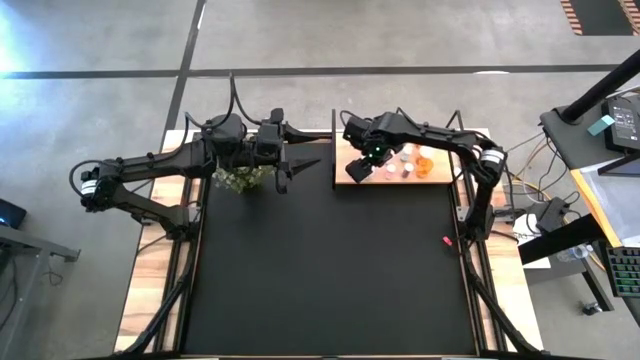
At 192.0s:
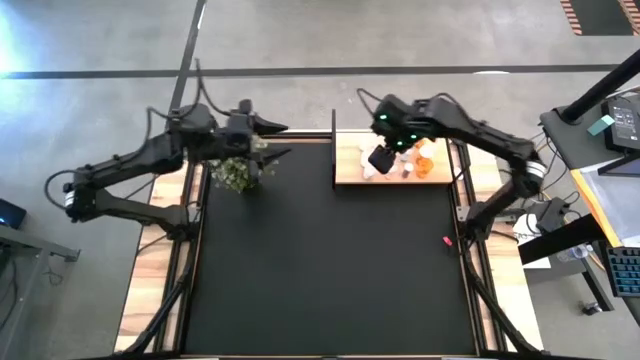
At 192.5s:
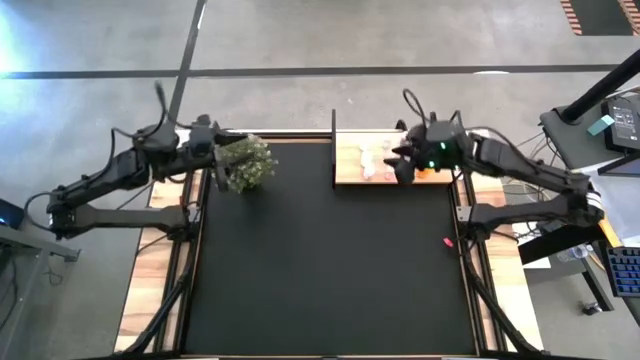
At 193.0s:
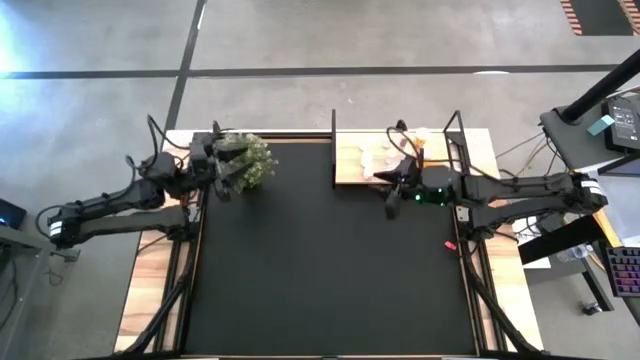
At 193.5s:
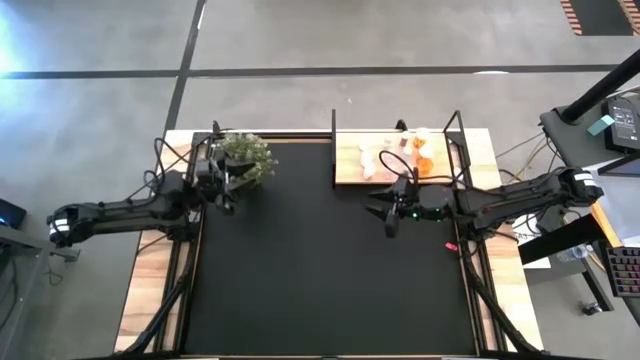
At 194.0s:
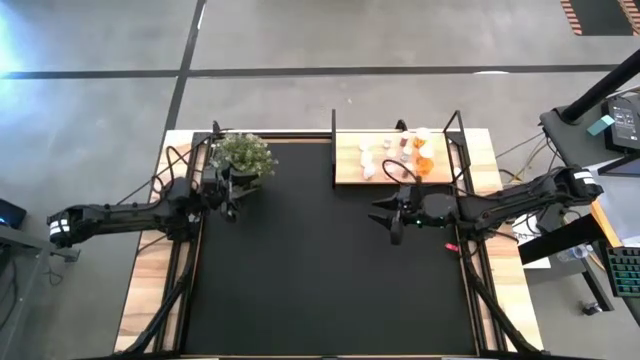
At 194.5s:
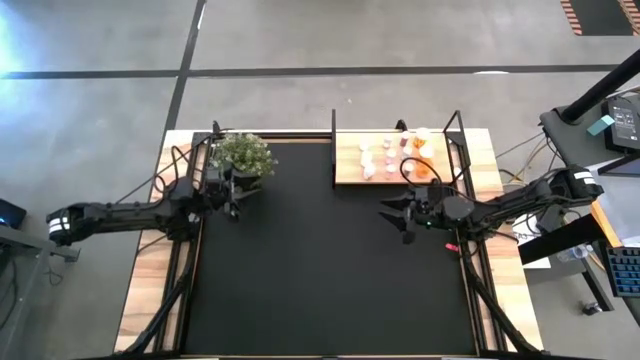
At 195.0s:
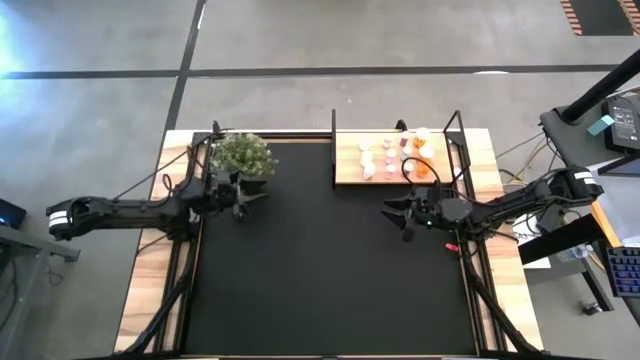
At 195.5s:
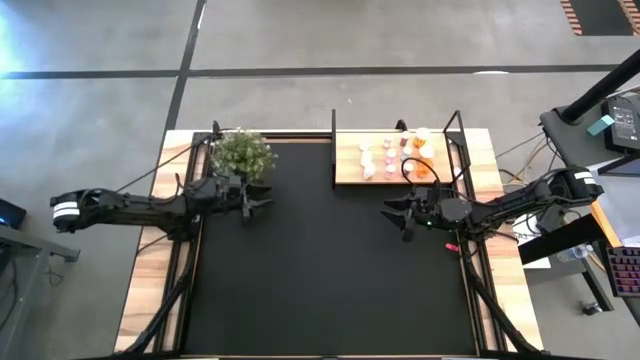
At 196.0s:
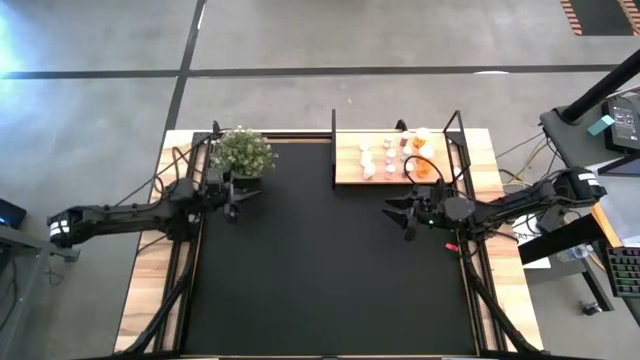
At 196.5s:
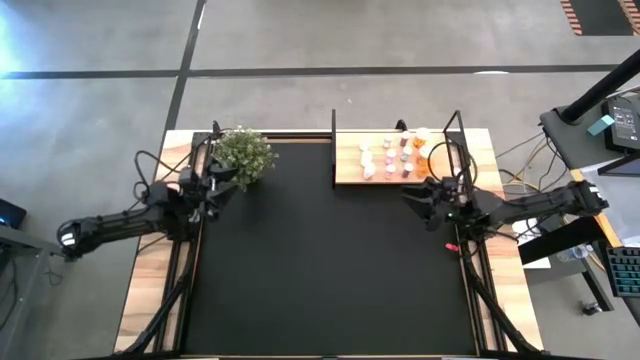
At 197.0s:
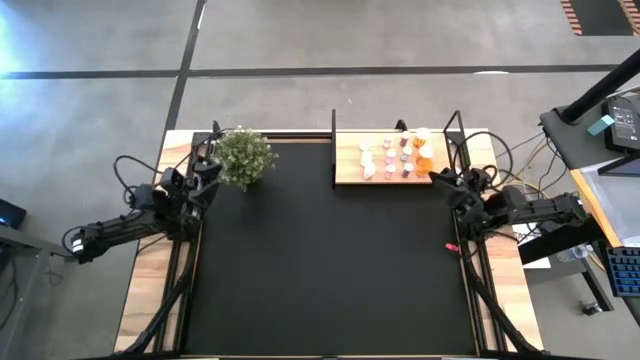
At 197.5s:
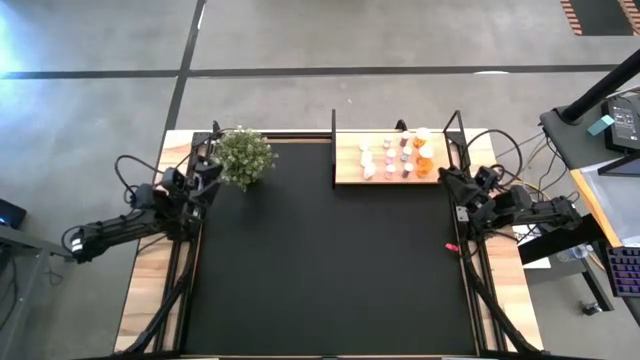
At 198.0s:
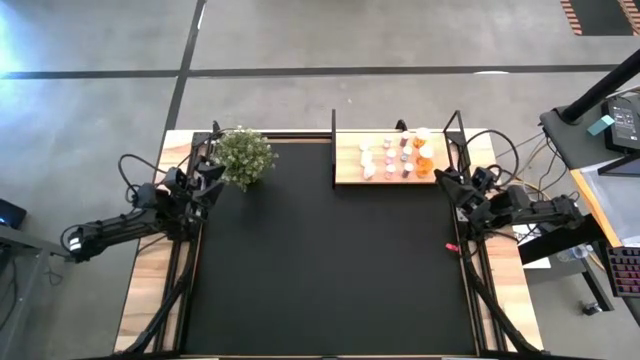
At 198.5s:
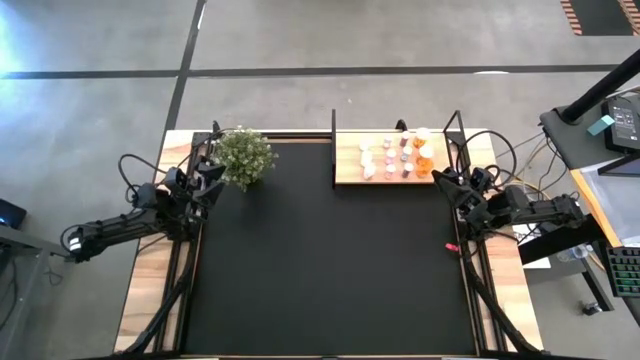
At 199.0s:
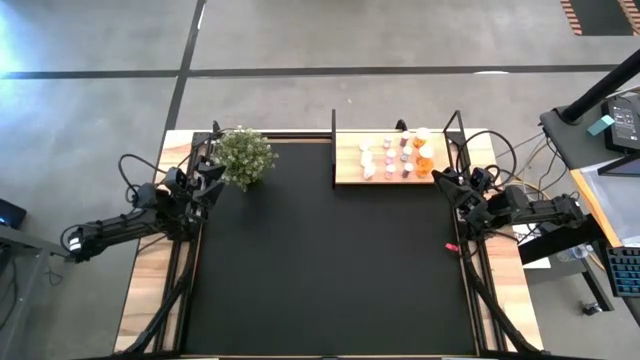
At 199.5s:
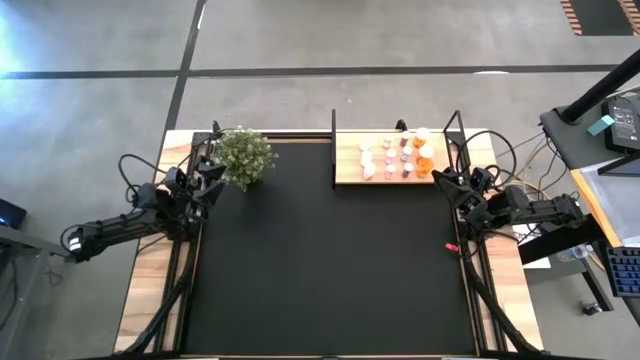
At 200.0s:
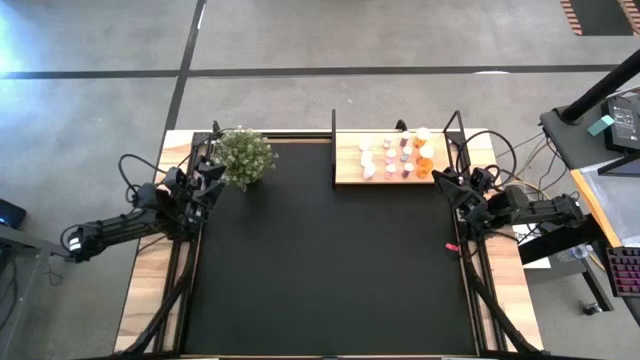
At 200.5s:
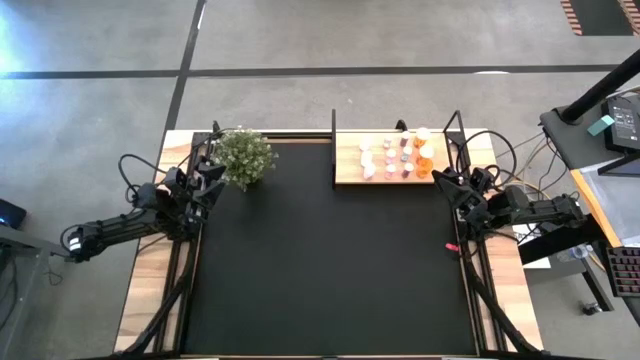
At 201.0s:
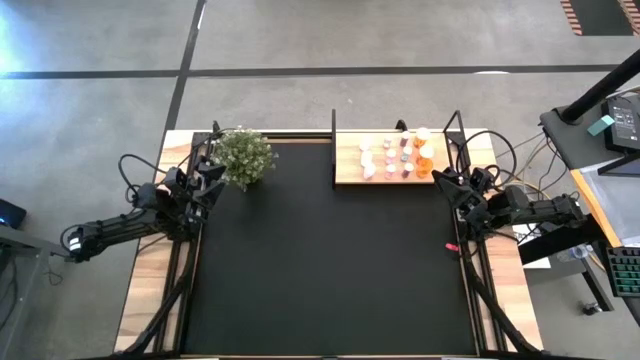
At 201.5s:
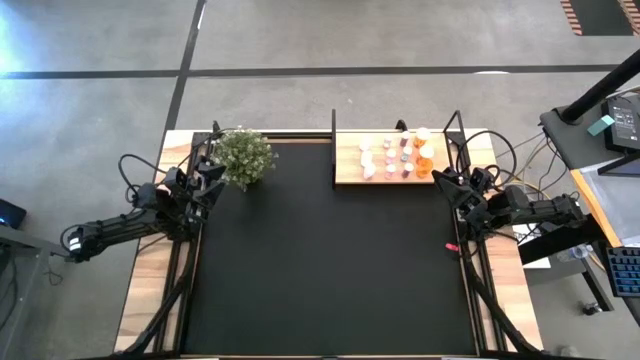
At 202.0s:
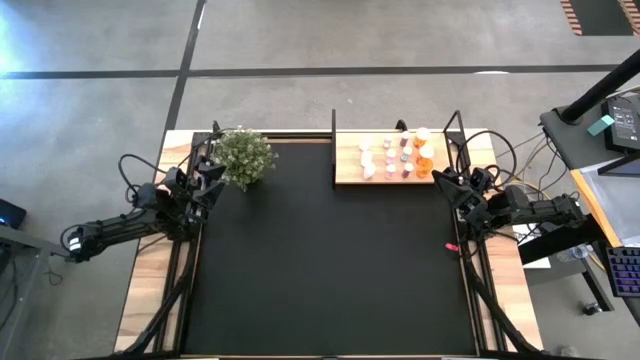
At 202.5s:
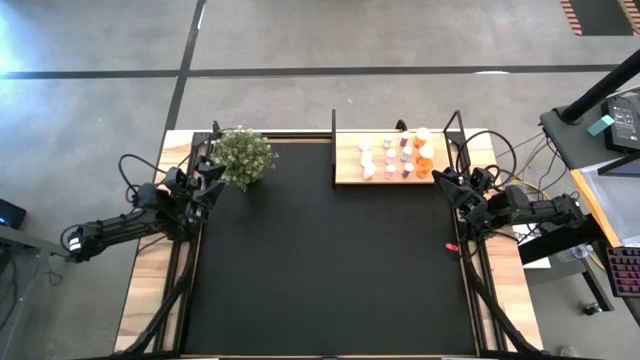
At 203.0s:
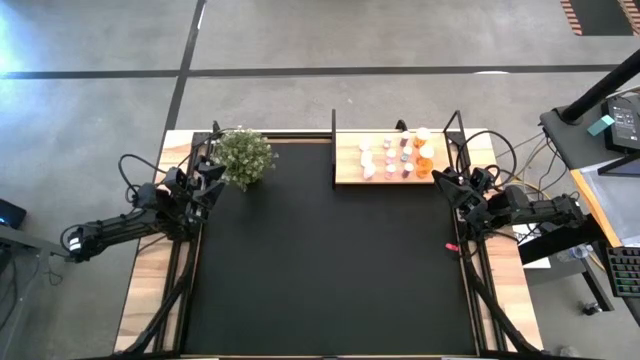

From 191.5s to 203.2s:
Task: Pick and place medicine bottles onto shelf by color
Return to Home Position

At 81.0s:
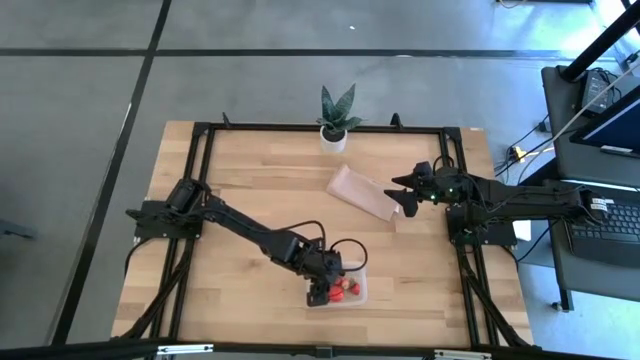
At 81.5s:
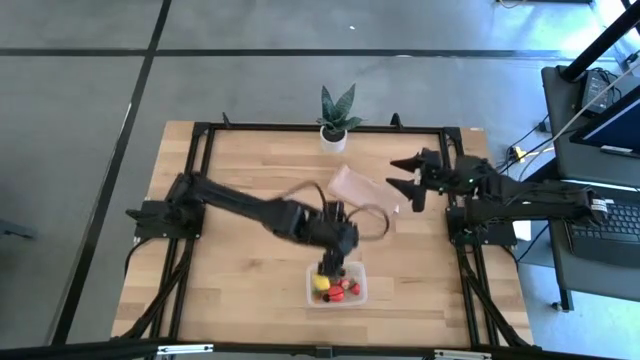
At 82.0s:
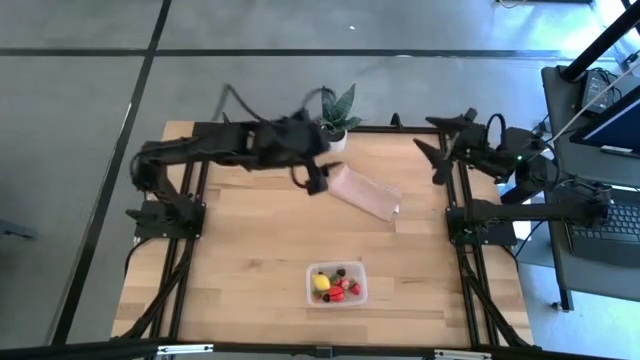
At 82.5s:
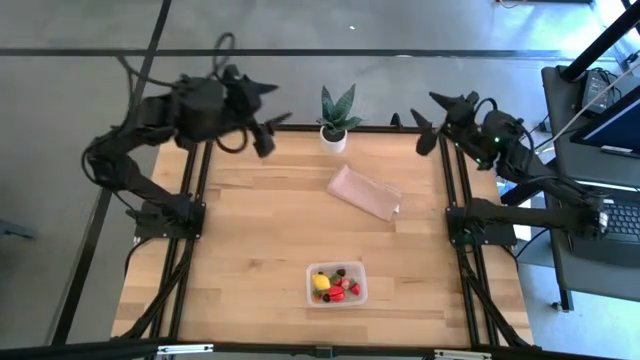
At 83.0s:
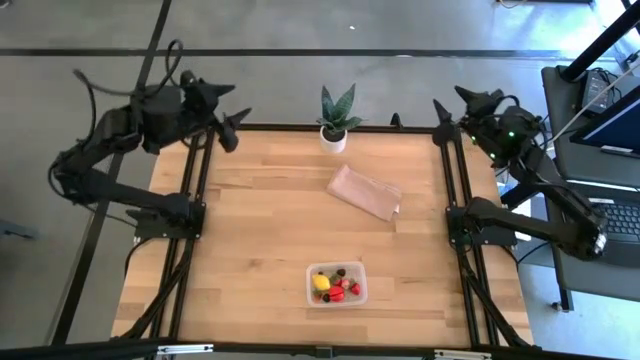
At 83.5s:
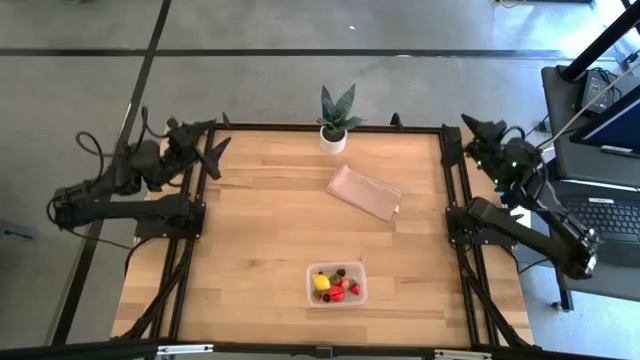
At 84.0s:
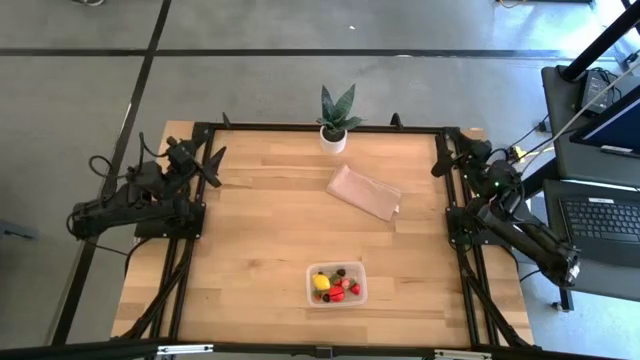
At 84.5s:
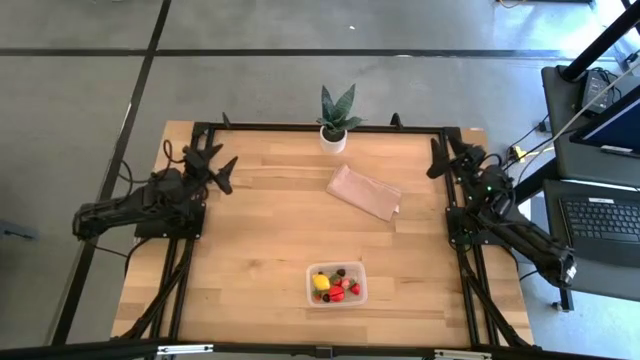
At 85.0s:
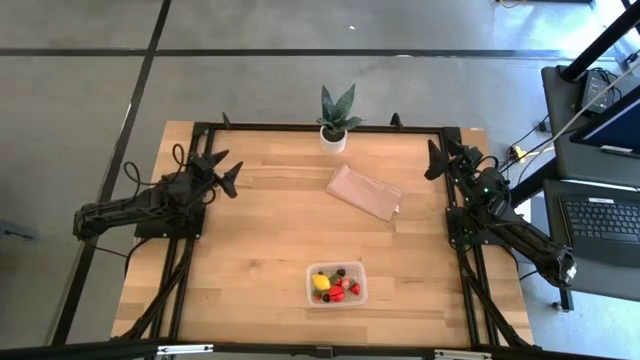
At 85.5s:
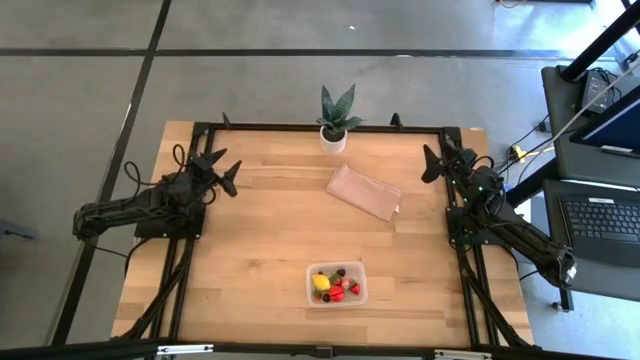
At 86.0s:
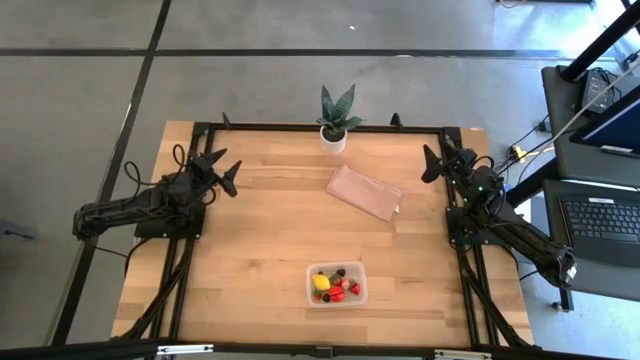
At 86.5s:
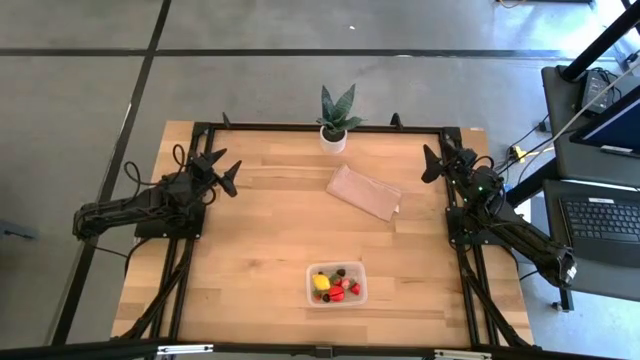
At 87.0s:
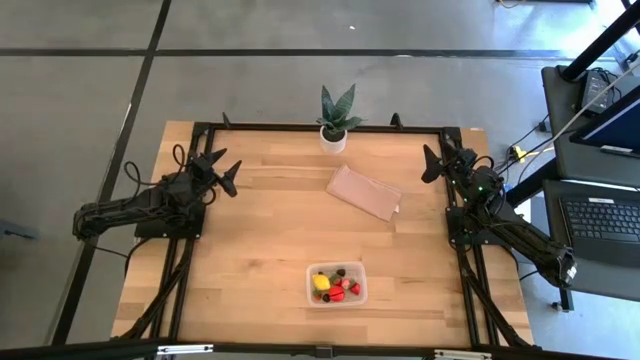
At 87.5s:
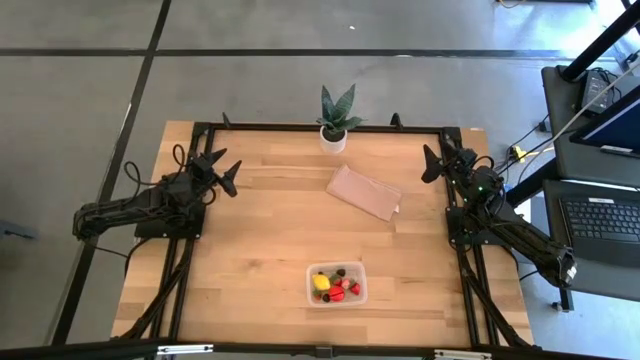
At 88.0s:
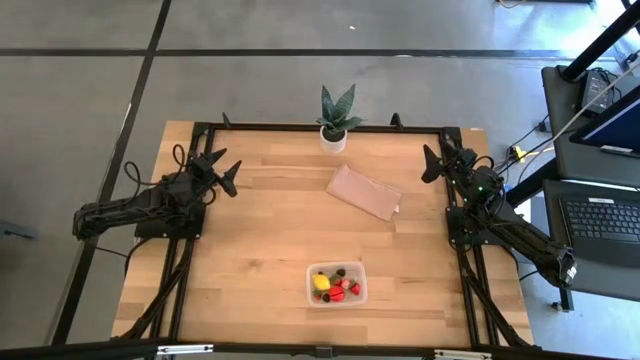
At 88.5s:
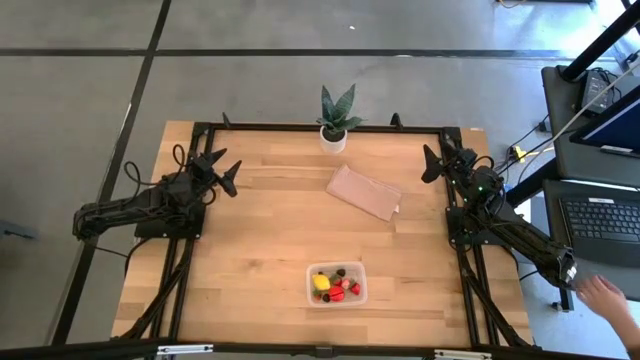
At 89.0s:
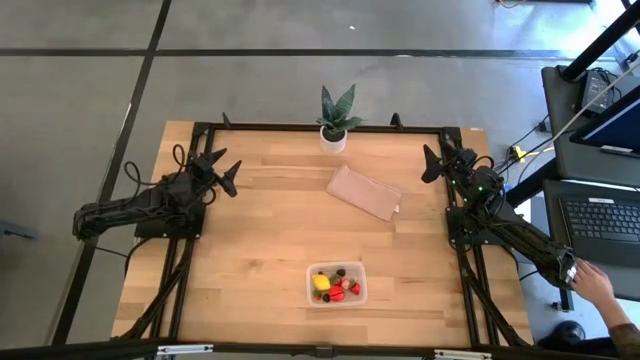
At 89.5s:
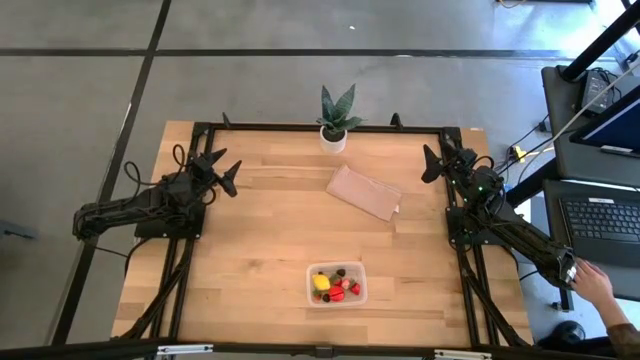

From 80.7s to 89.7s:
Task: Pick and placing Produce into tupperware
Return to Home Position
